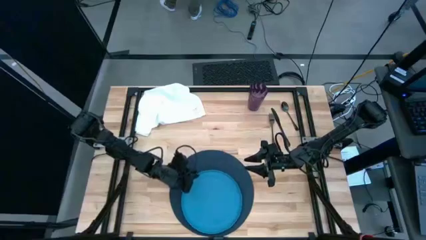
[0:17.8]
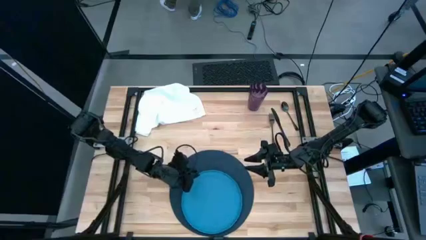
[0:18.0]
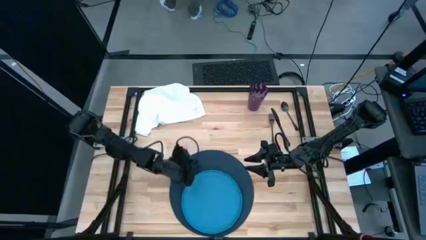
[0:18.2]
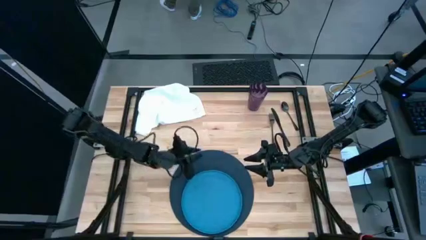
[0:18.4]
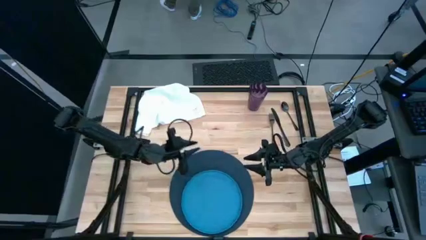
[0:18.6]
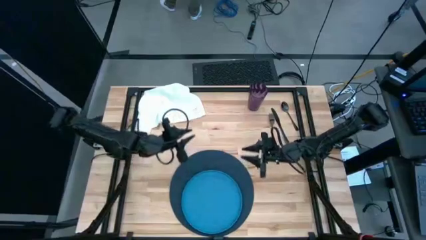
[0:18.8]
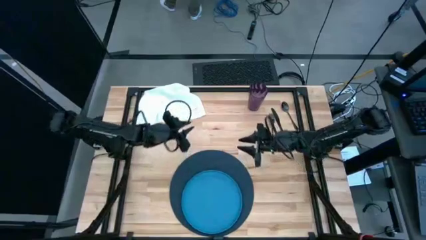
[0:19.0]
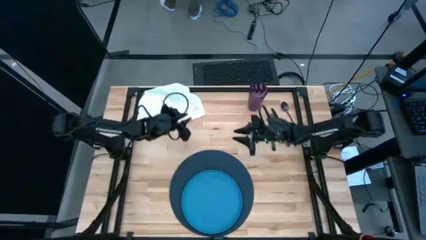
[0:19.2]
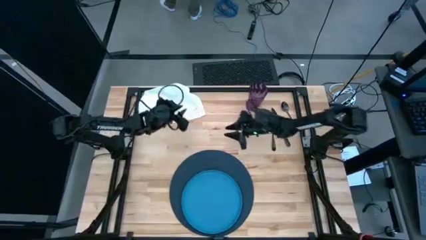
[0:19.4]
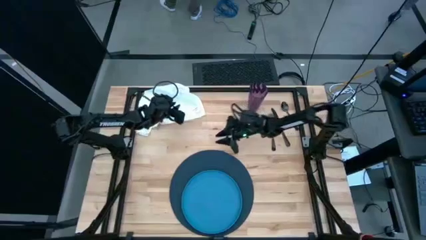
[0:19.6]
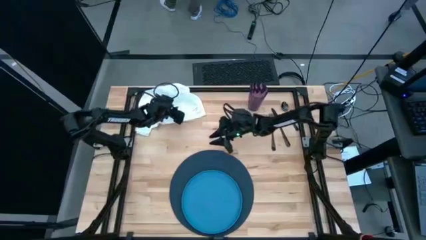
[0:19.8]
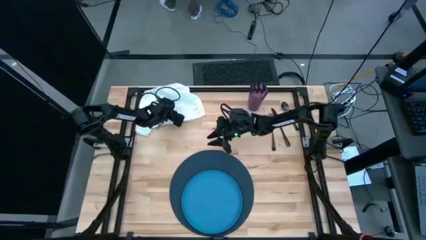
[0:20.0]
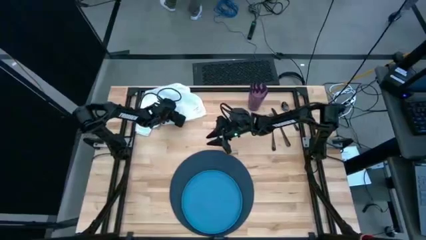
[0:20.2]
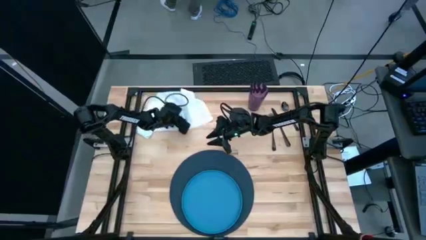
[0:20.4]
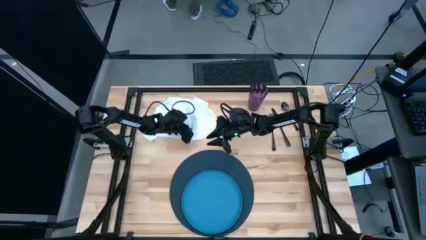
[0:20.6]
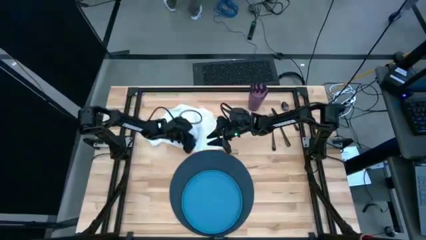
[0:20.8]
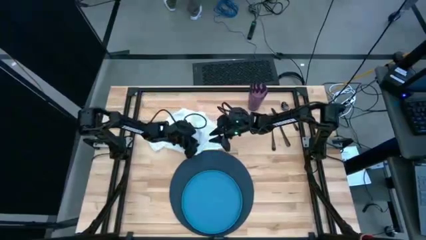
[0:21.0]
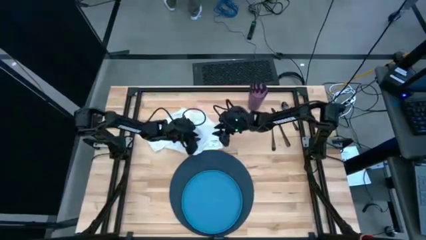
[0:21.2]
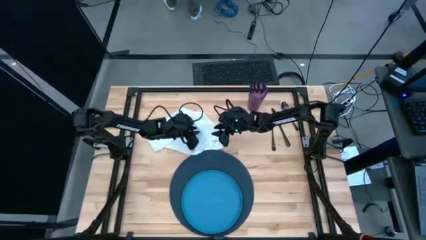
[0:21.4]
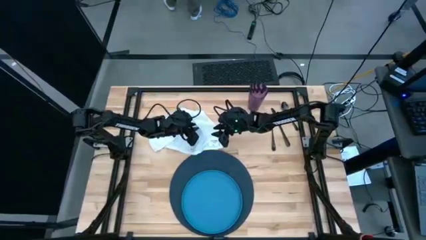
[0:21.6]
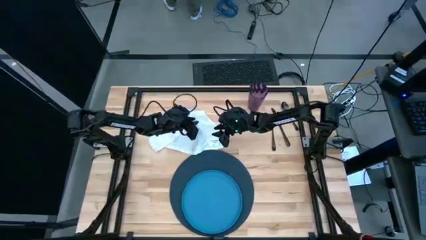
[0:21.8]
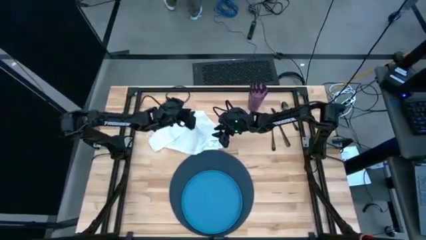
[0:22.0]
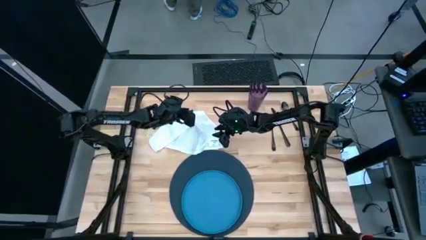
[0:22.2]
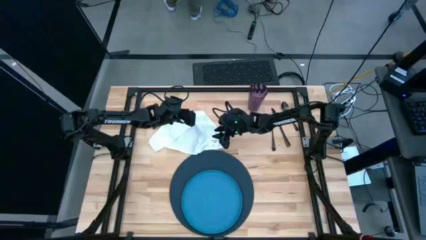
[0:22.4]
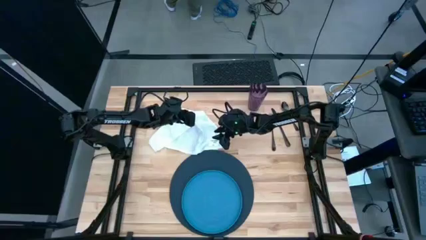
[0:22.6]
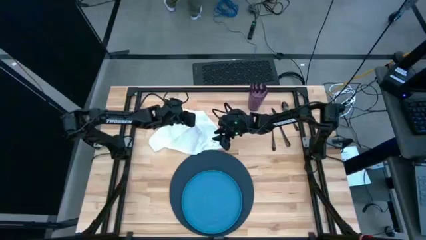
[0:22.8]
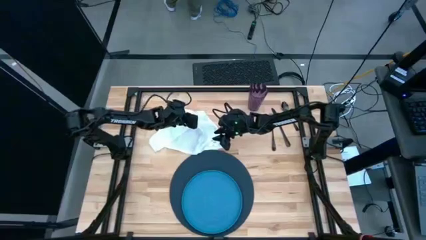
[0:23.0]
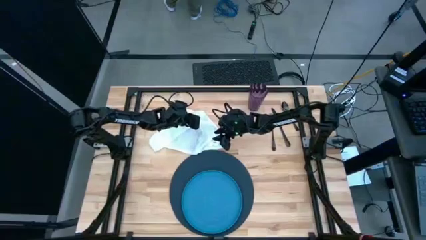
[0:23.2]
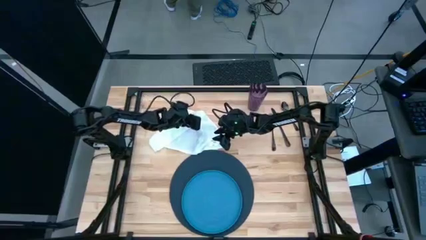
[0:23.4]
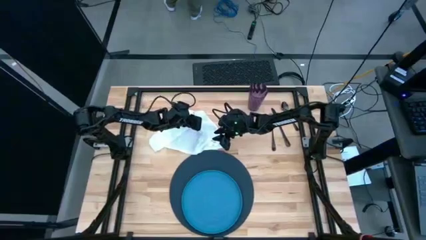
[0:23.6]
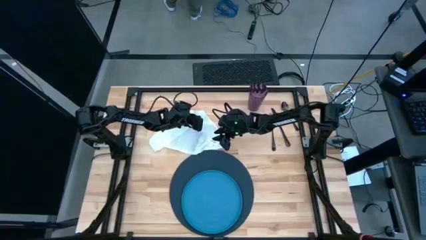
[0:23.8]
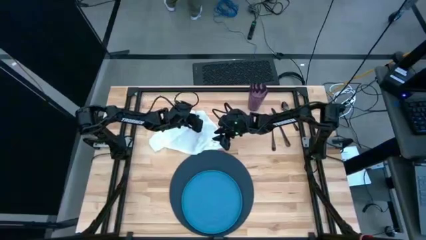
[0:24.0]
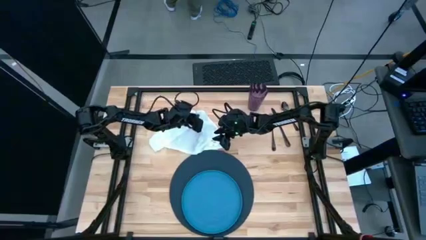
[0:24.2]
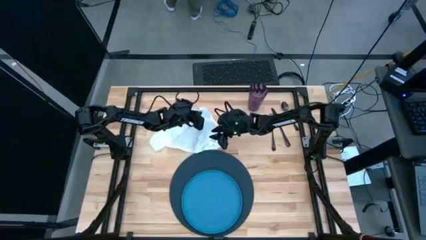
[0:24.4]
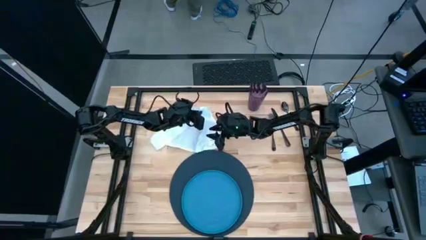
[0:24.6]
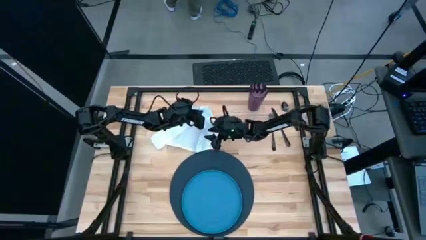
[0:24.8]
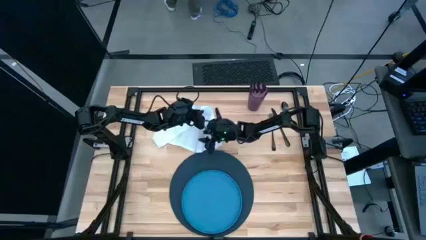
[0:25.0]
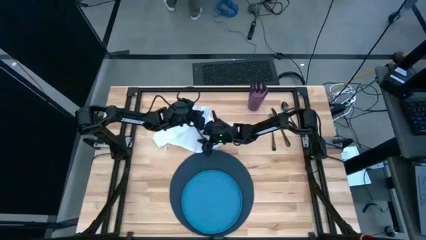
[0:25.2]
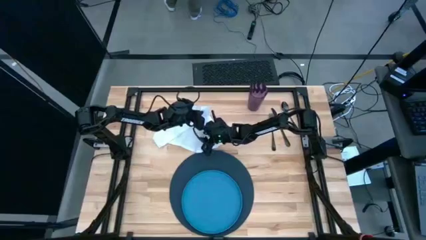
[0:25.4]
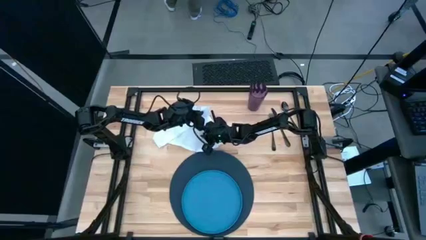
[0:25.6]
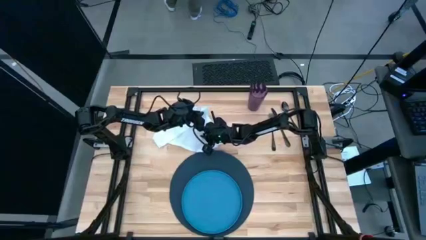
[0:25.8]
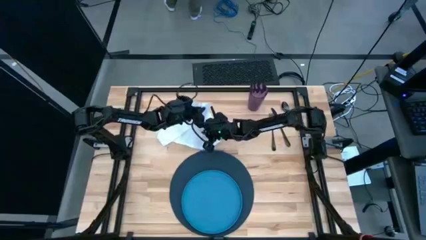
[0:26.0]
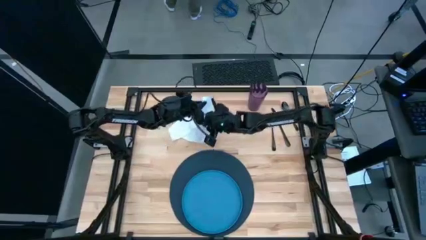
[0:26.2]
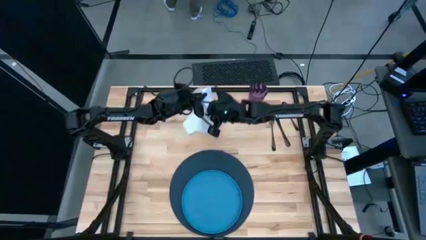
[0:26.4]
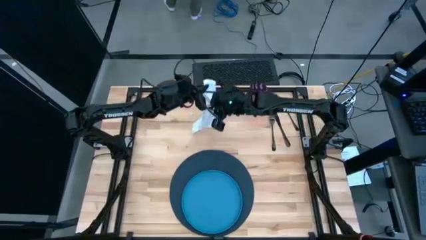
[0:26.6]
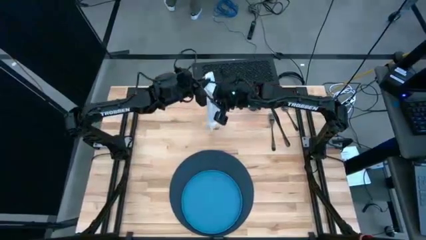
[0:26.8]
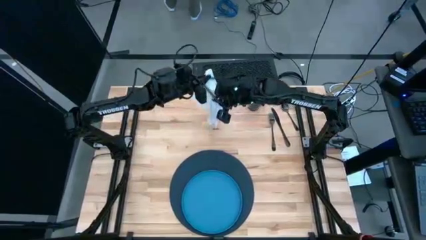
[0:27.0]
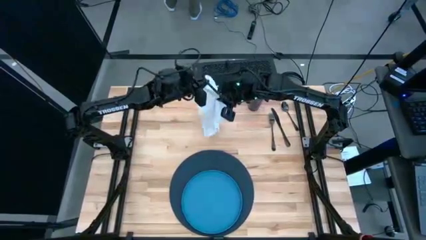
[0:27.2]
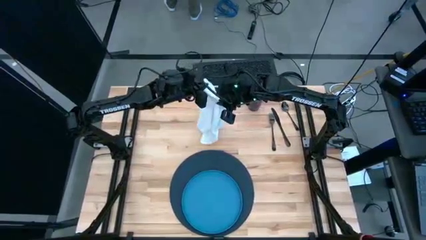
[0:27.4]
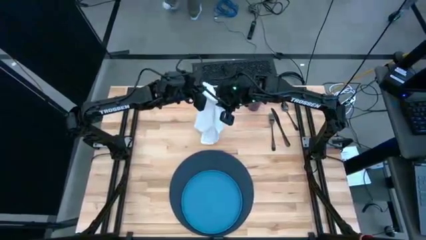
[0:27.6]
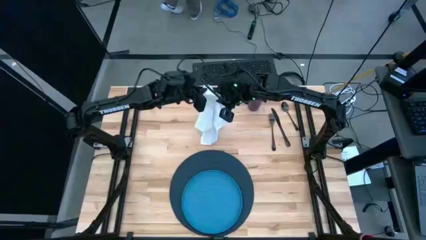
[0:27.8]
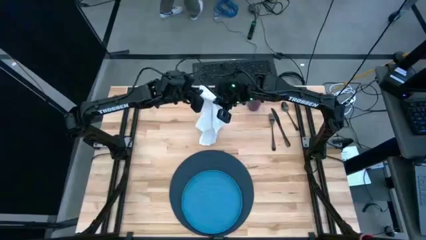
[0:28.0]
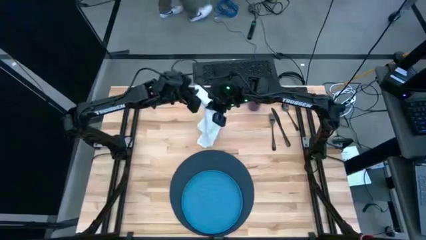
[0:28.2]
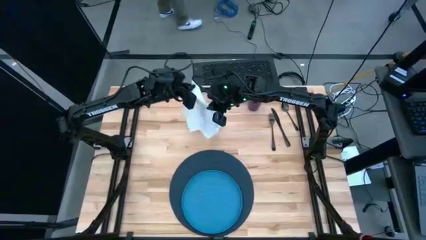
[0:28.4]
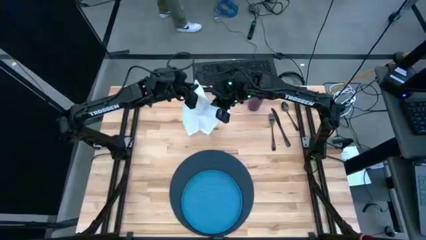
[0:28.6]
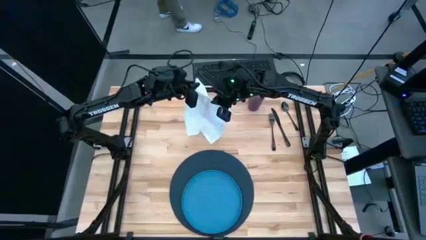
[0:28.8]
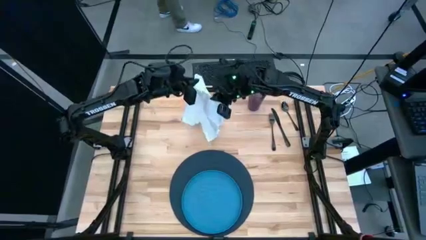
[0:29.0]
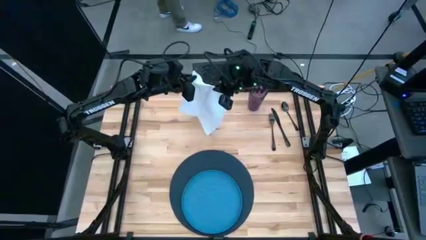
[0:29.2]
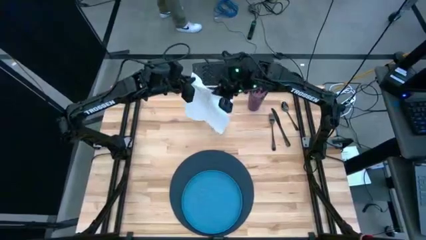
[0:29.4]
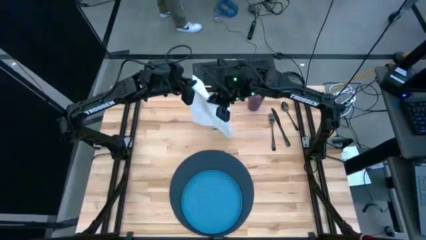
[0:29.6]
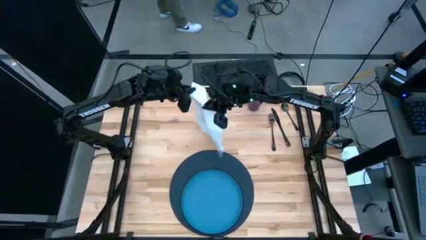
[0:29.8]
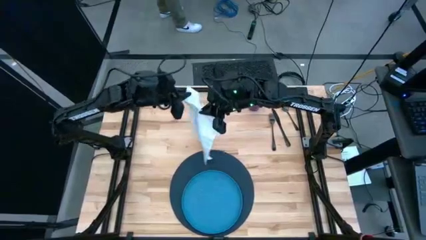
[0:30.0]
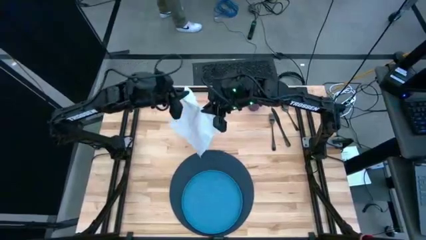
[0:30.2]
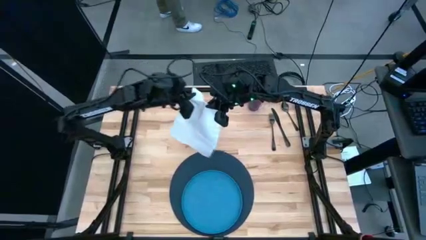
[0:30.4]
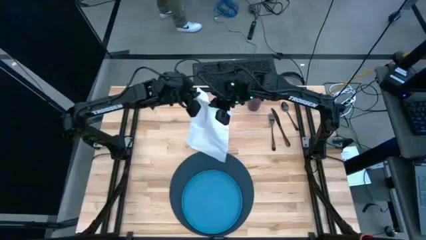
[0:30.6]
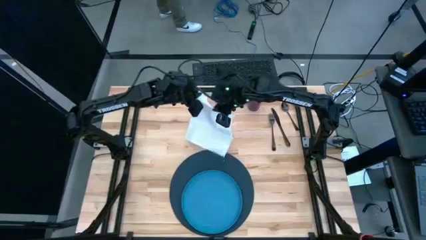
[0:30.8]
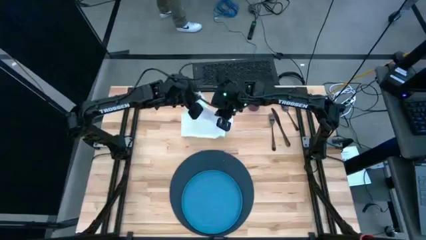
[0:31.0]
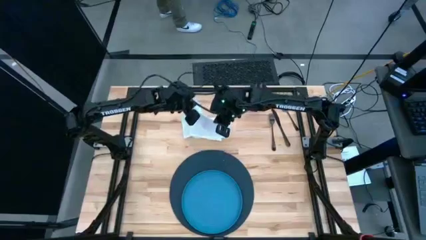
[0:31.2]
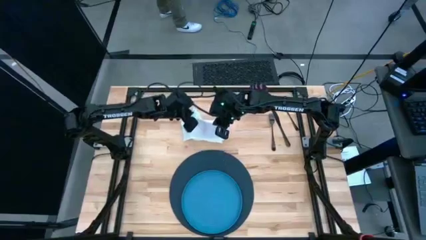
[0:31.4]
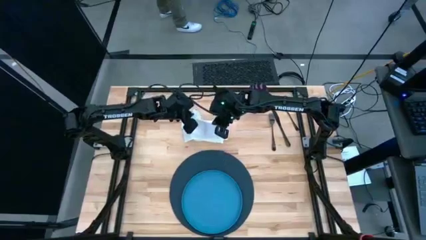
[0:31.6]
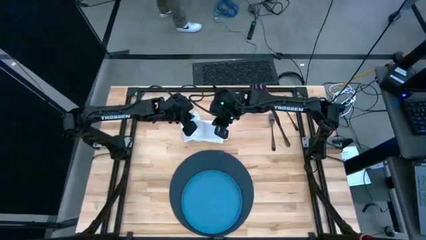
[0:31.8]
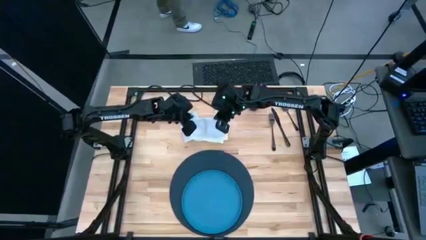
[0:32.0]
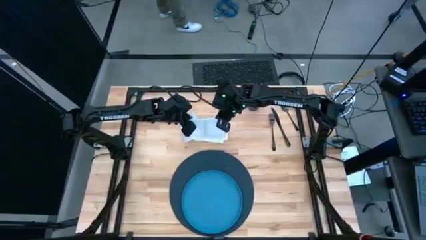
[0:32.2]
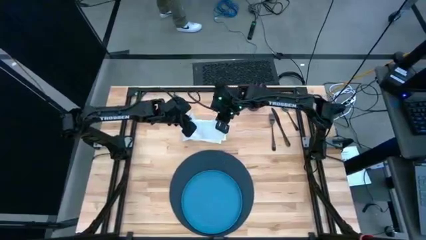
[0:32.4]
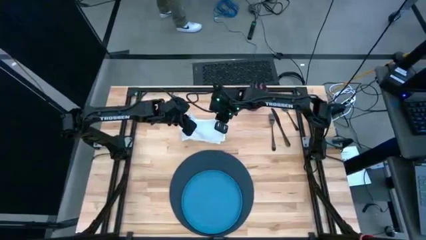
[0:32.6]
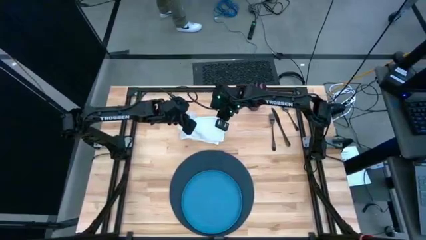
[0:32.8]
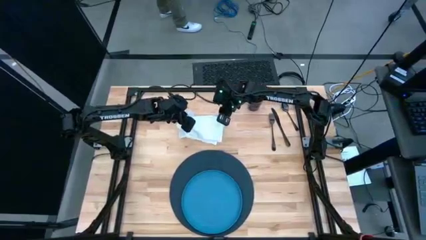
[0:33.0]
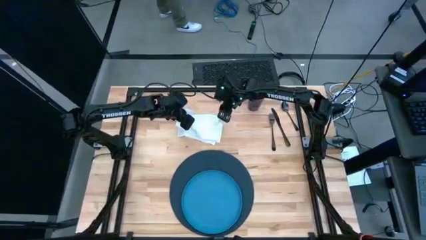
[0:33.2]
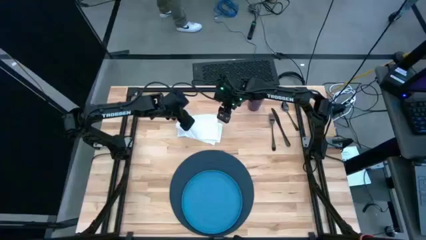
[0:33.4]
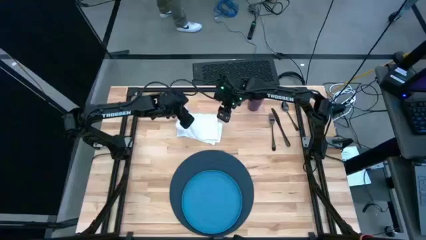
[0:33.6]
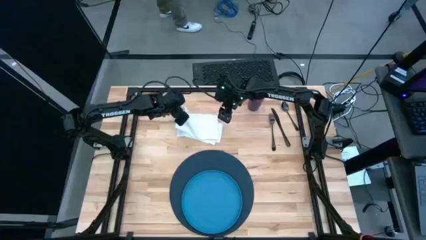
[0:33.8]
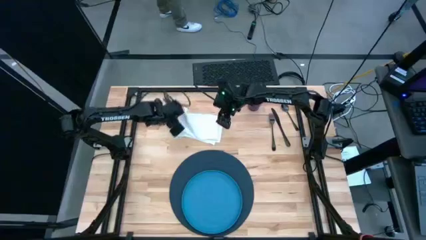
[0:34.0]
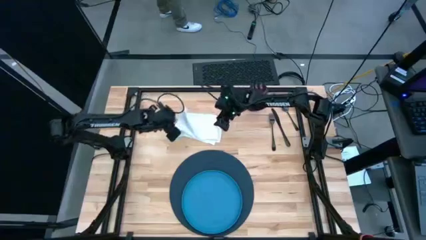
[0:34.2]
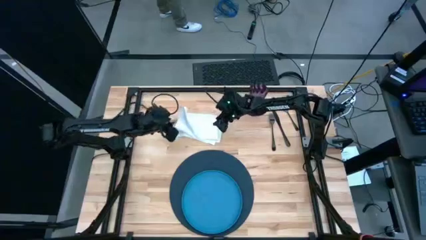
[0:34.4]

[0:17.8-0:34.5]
Task: Set table place
Fold the table napkin
